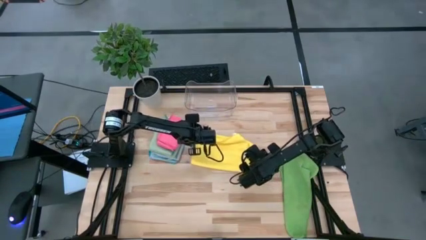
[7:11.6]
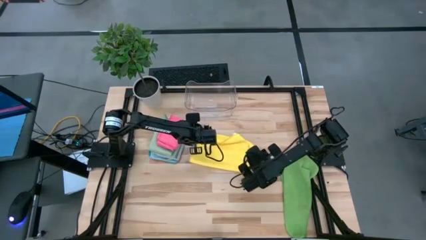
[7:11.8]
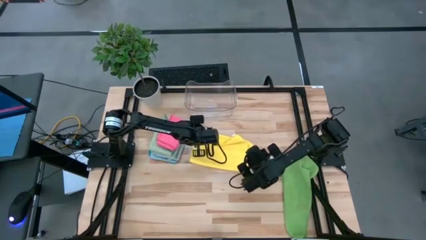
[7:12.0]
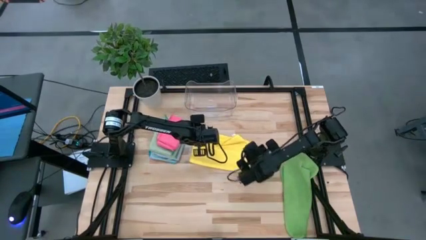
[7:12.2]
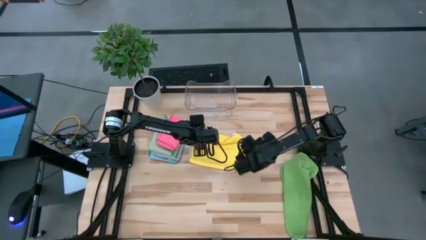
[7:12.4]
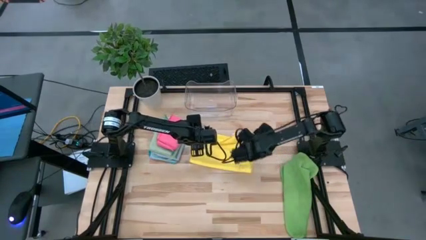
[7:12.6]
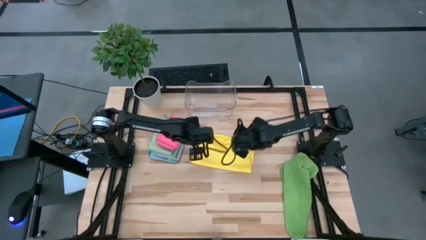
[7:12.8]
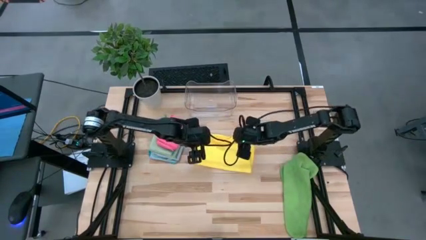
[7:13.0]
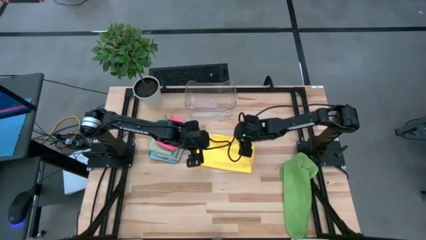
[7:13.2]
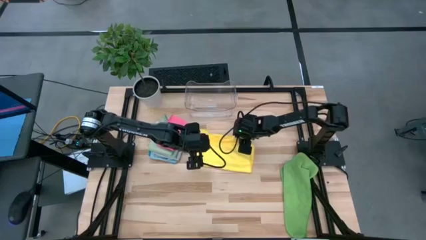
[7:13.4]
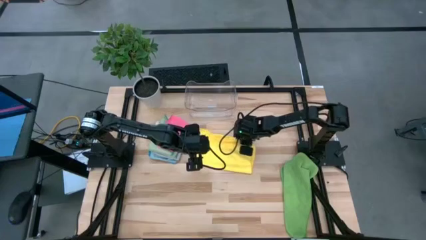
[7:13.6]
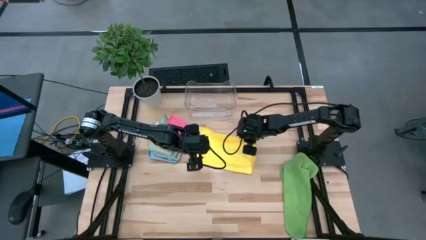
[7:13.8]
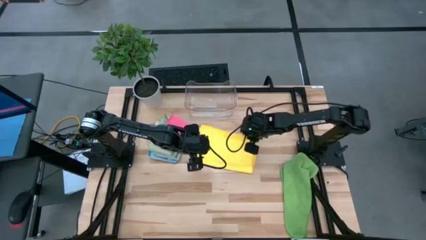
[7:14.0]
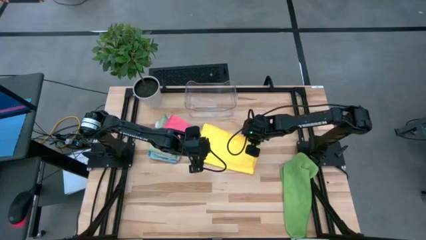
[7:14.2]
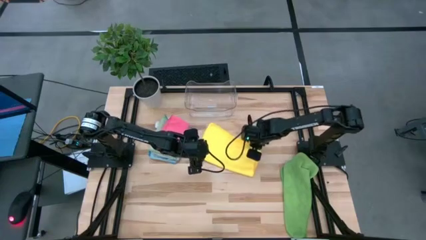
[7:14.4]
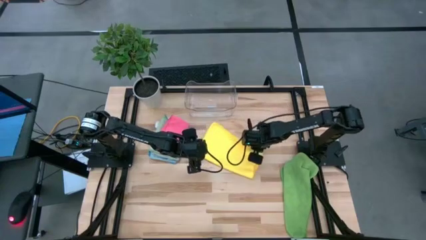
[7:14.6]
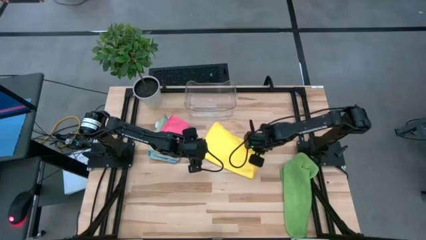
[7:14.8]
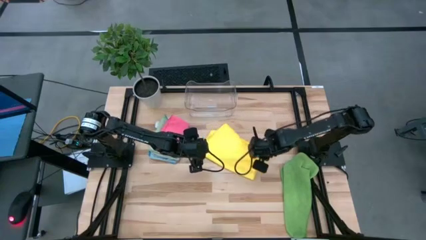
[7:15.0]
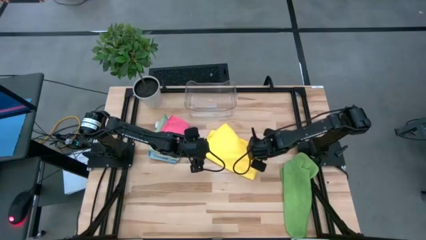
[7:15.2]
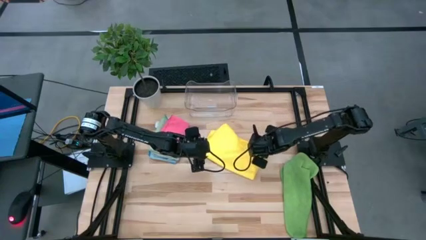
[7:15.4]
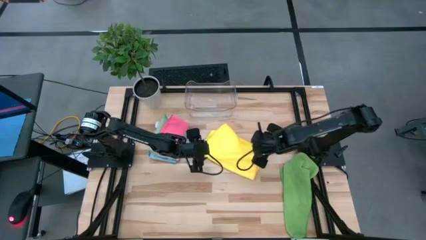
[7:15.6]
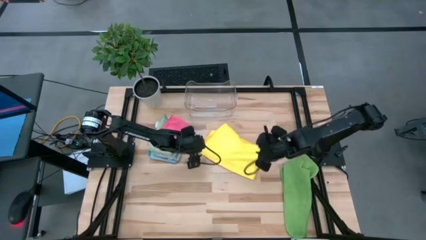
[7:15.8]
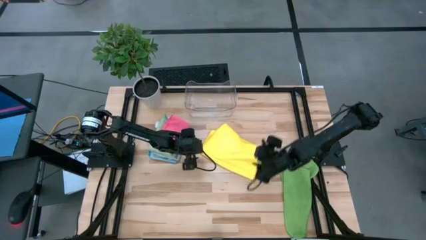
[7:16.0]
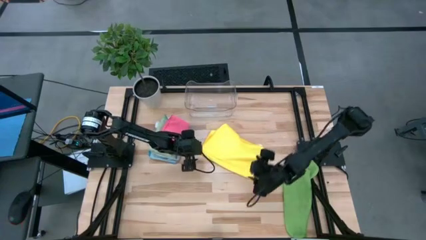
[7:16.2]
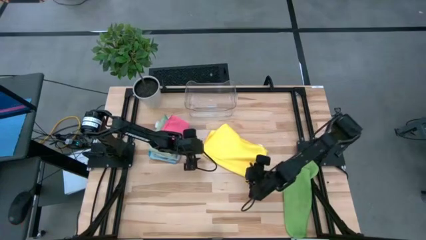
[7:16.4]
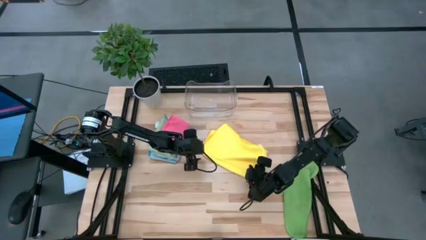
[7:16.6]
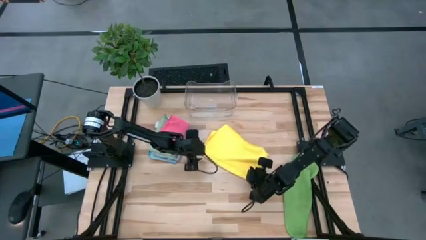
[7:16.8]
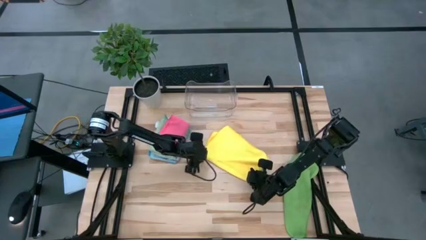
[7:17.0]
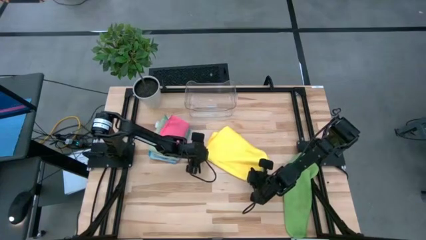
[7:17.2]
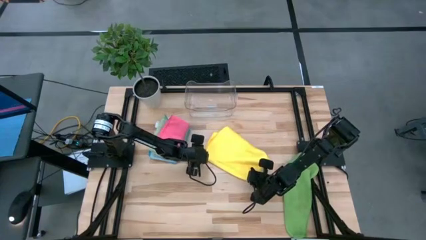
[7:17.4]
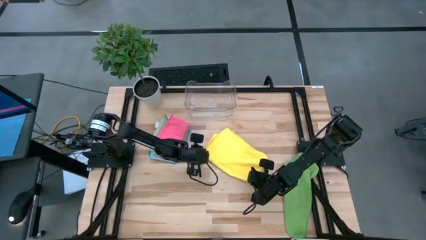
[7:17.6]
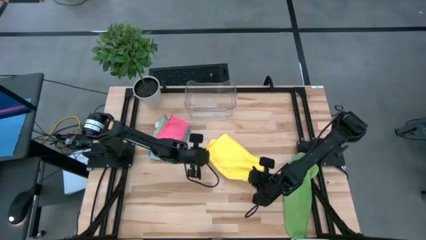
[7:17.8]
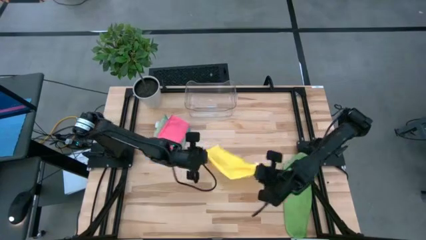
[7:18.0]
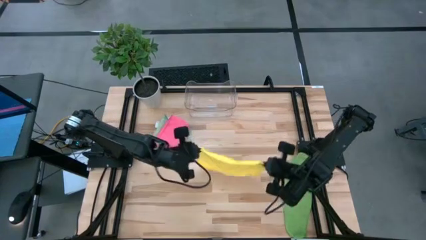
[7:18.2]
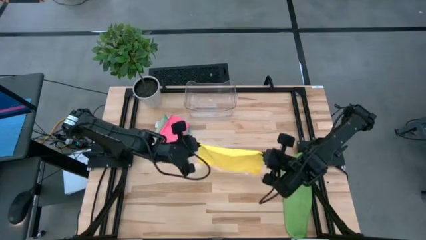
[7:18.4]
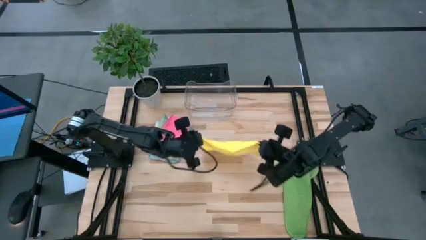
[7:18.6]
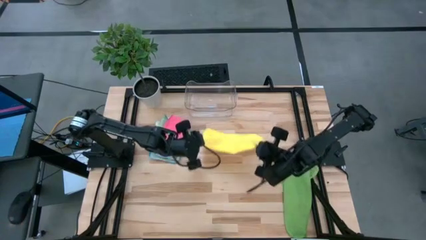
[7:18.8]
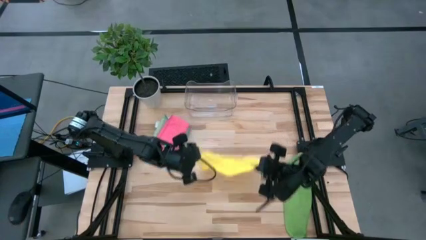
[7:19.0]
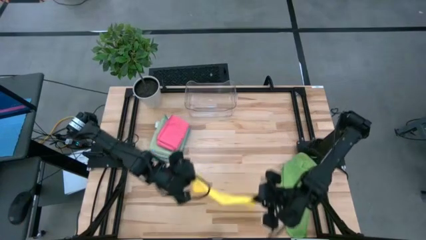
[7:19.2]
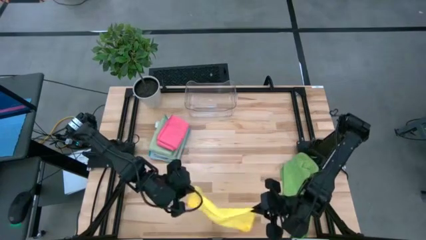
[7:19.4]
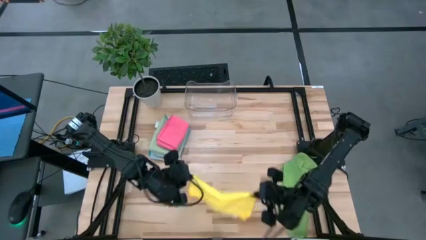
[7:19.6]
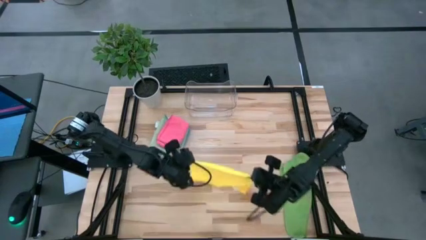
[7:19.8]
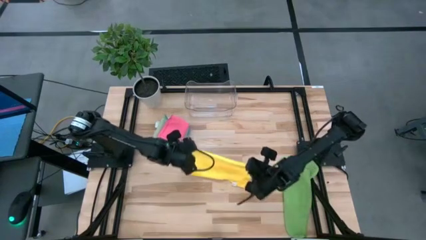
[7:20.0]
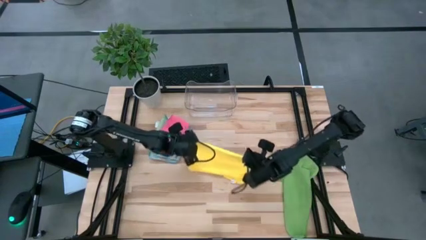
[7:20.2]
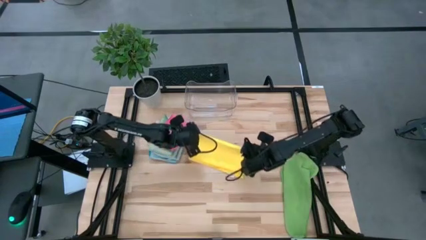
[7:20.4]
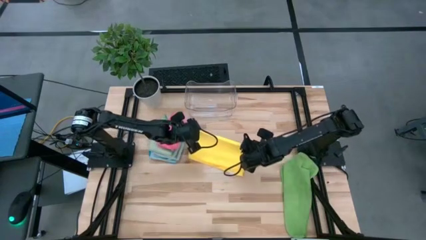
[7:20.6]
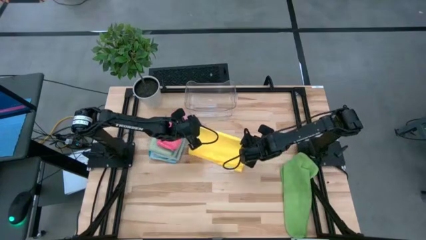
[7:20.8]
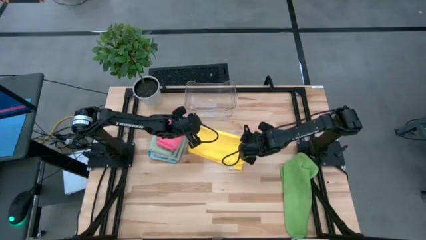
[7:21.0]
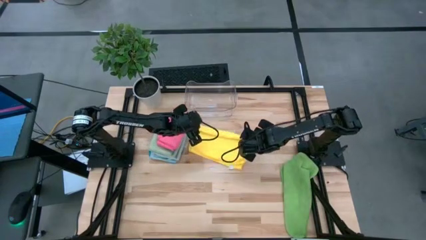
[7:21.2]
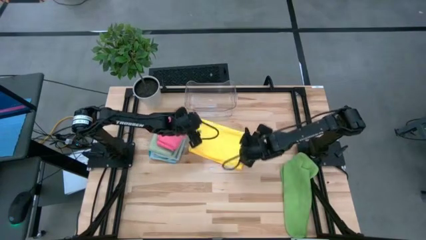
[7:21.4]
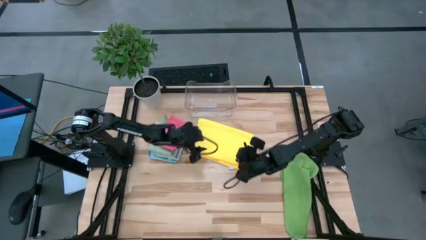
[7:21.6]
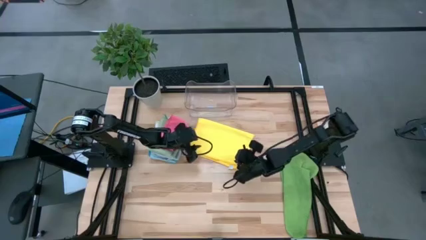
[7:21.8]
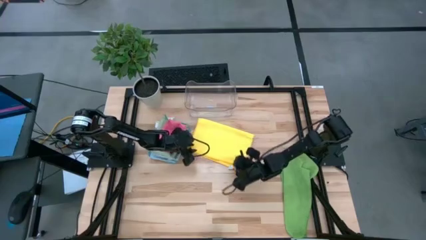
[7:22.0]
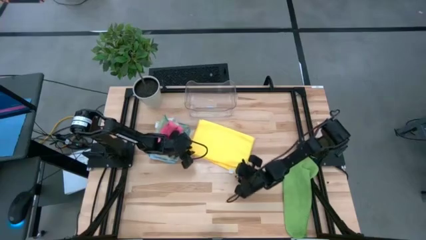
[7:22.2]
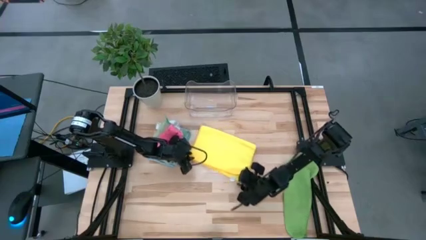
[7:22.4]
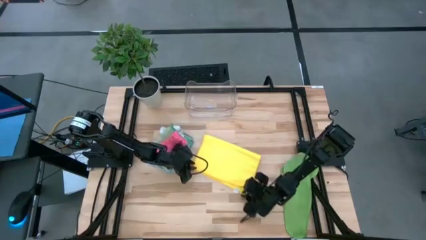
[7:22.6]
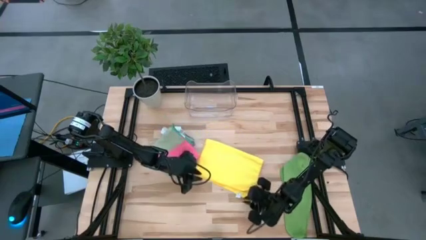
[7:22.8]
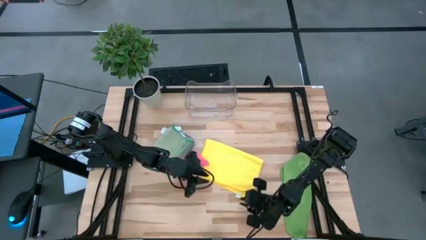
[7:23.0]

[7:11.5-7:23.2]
Task: Fold microfiber towels
Fold the yellow microfiber cloth

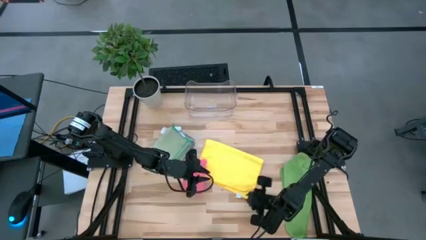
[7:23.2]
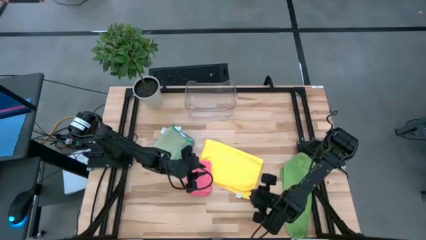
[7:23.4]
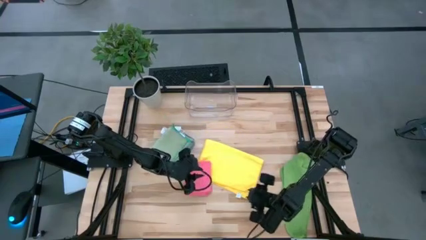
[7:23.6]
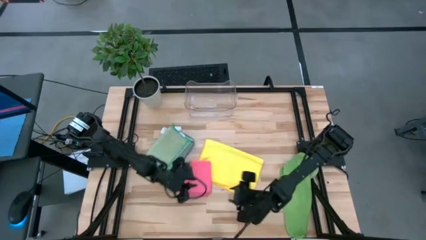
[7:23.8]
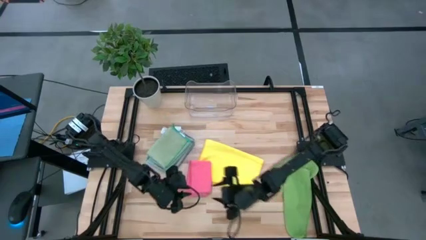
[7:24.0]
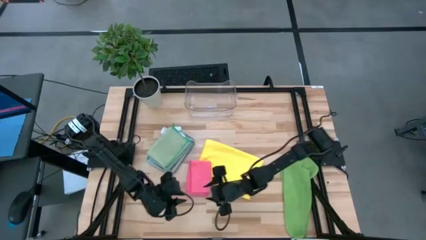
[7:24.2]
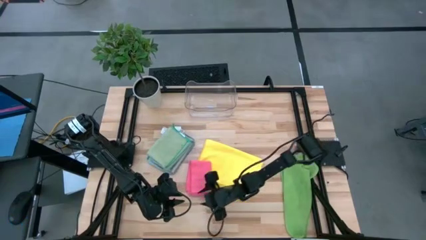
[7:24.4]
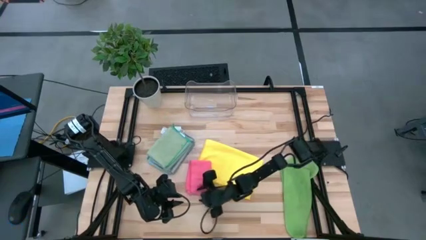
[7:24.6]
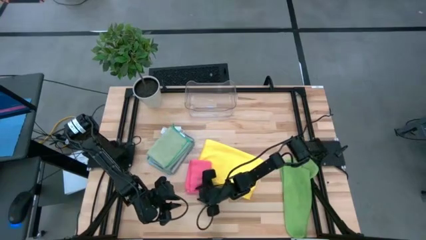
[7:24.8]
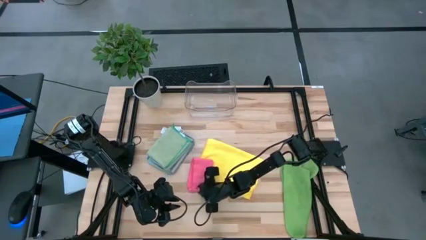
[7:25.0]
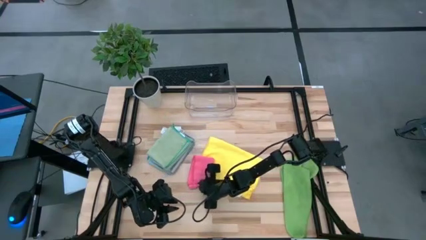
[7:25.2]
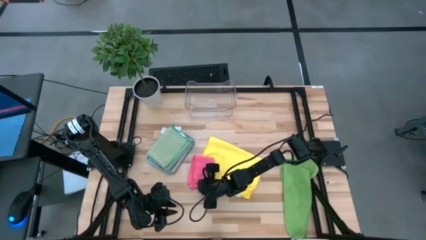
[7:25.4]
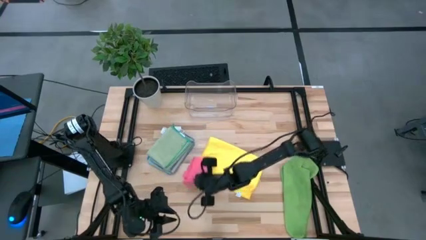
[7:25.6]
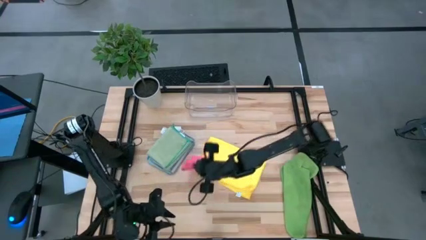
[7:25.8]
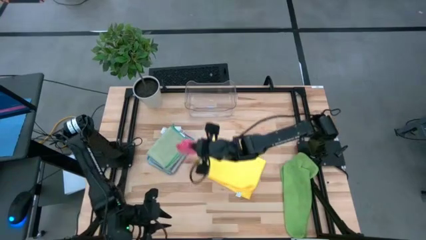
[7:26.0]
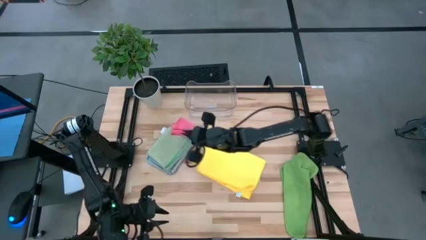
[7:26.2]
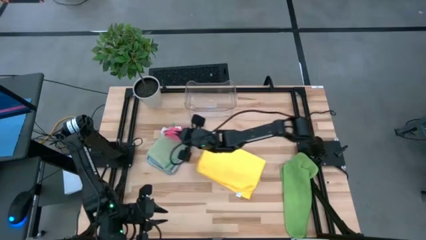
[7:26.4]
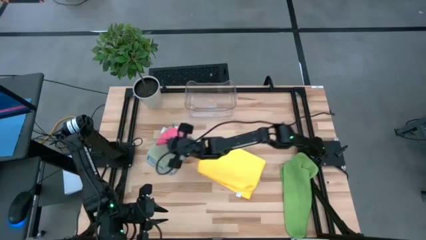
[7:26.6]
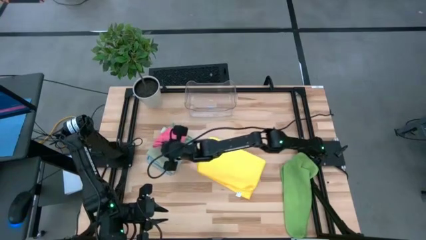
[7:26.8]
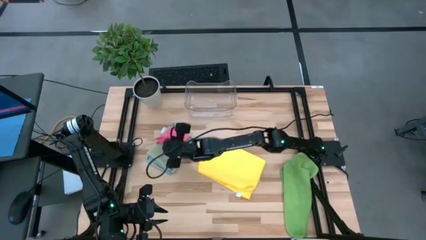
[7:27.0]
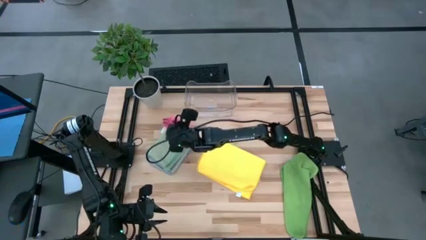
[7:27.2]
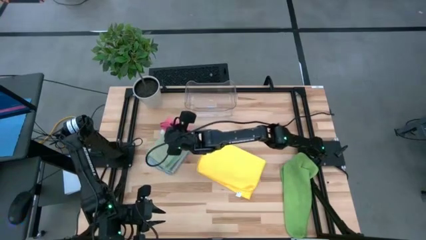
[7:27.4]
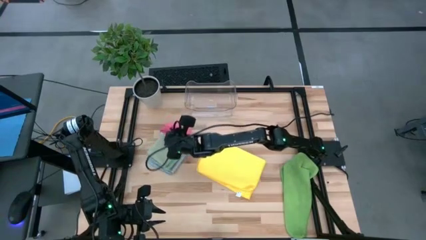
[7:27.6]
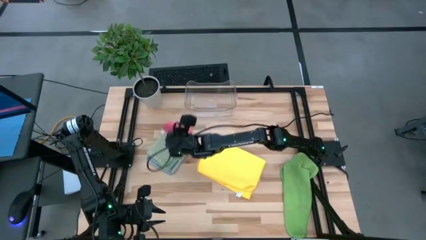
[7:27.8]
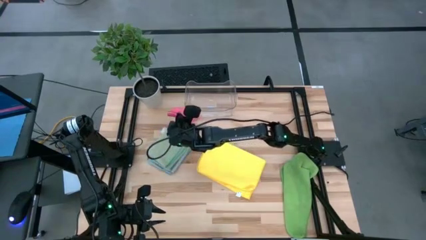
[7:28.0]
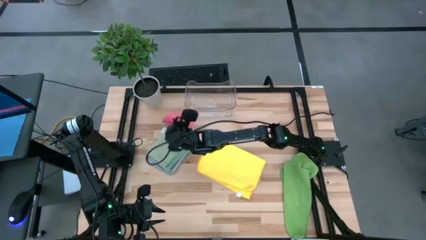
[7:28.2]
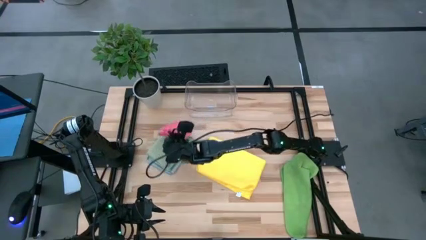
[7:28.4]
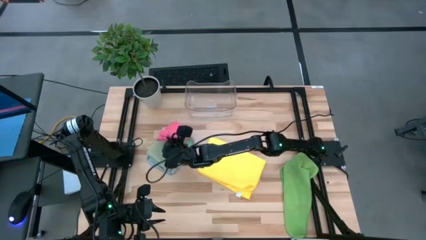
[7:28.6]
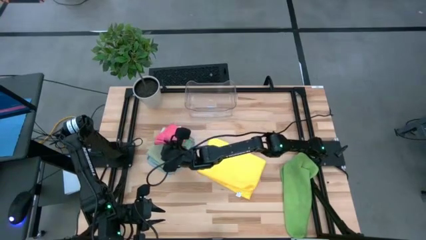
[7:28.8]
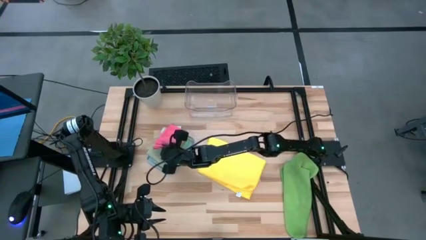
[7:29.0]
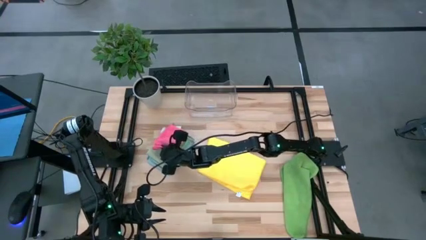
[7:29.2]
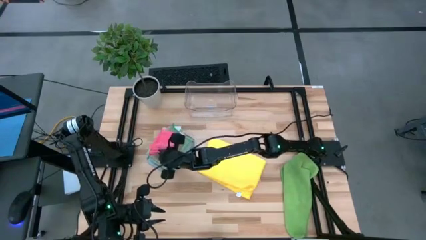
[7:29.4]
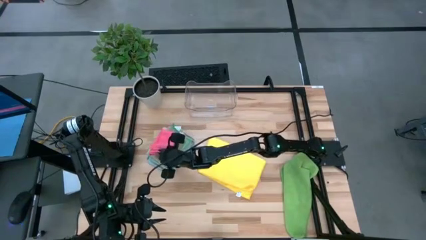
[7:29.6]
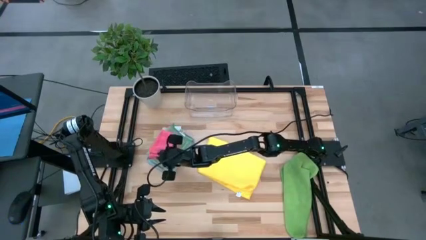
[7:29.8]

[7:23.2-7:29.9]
Stack the folded pink microfiber cloth on top of the folded light green microfiber cloth
